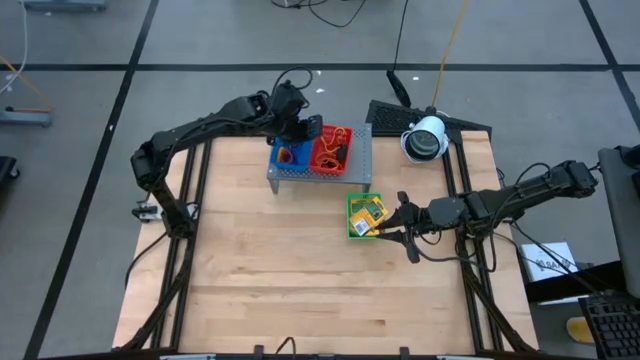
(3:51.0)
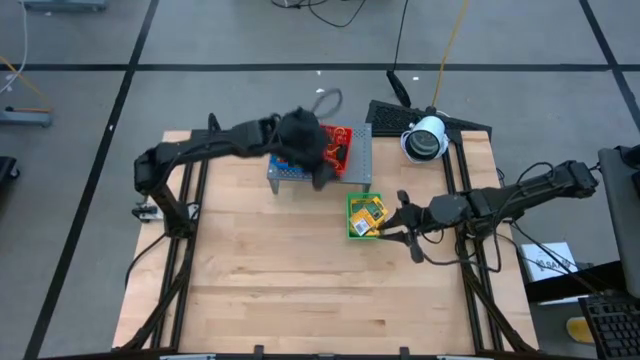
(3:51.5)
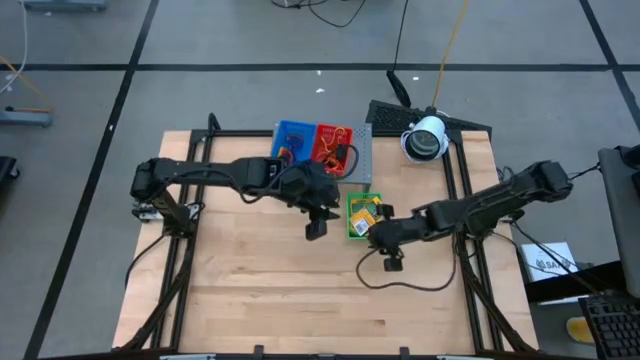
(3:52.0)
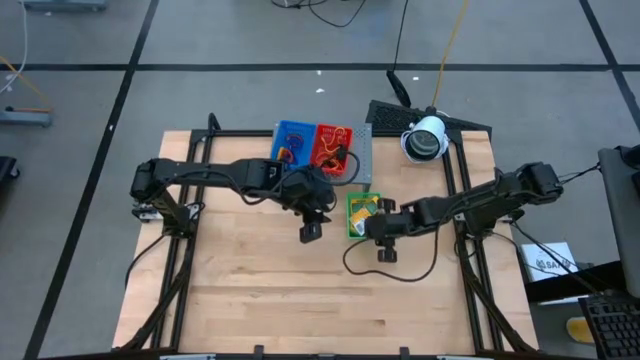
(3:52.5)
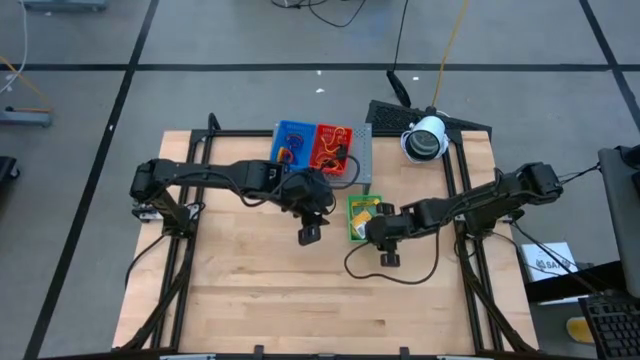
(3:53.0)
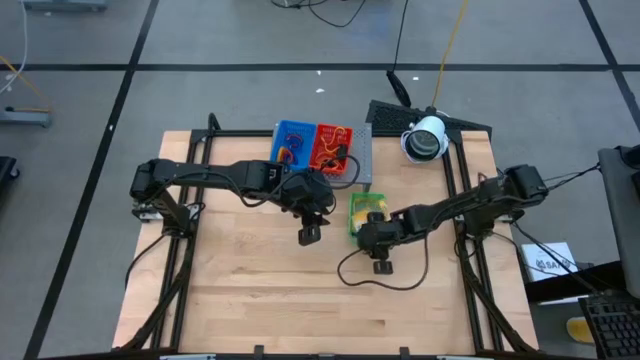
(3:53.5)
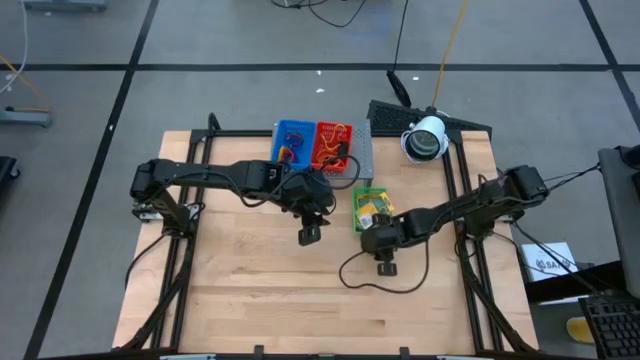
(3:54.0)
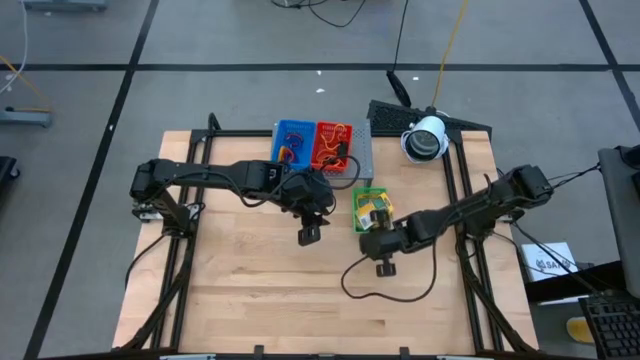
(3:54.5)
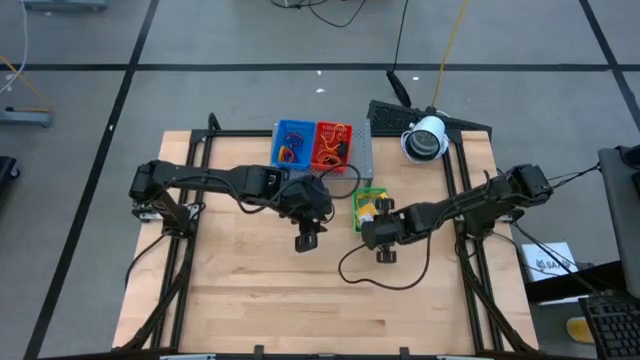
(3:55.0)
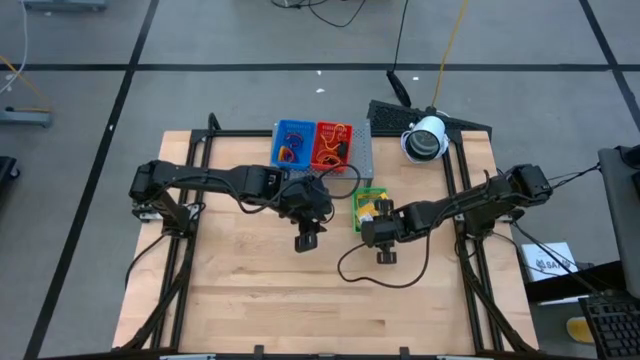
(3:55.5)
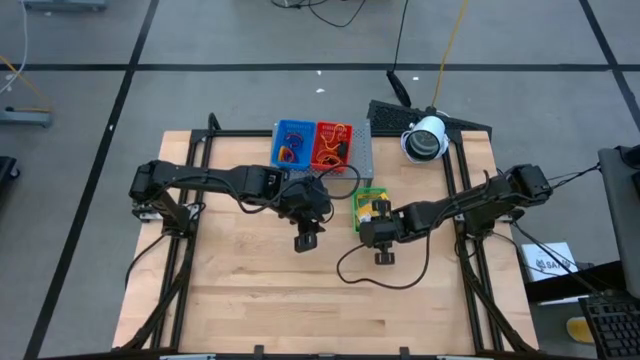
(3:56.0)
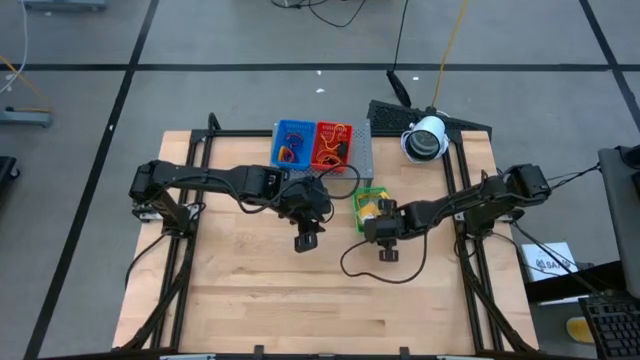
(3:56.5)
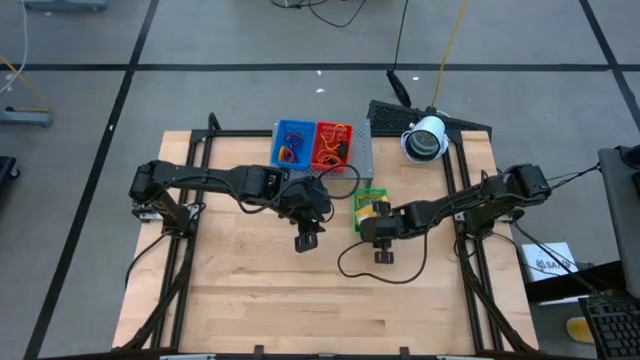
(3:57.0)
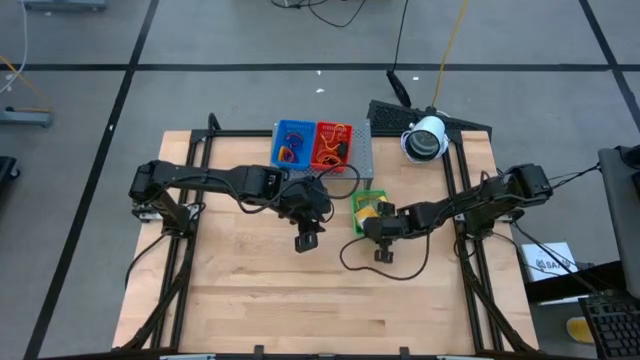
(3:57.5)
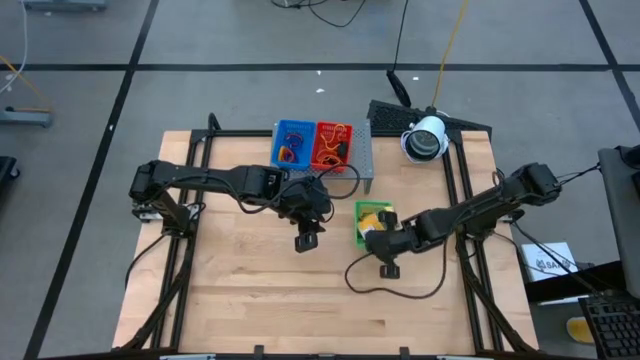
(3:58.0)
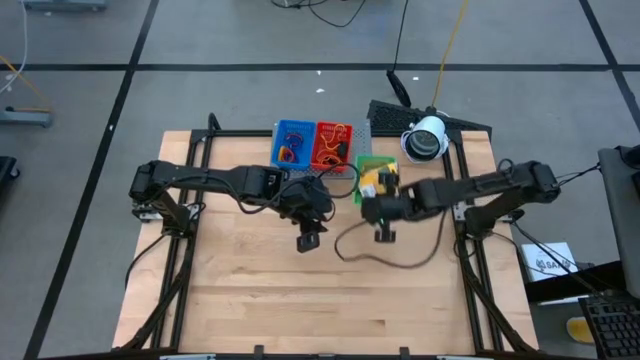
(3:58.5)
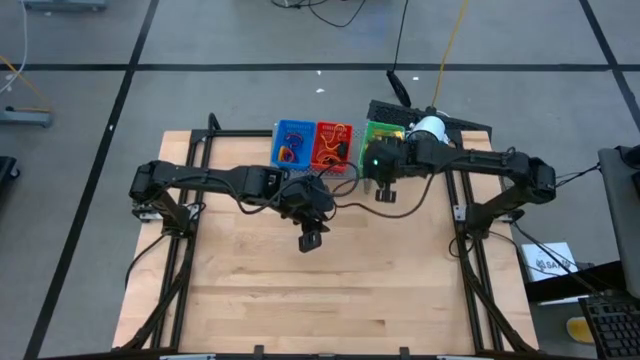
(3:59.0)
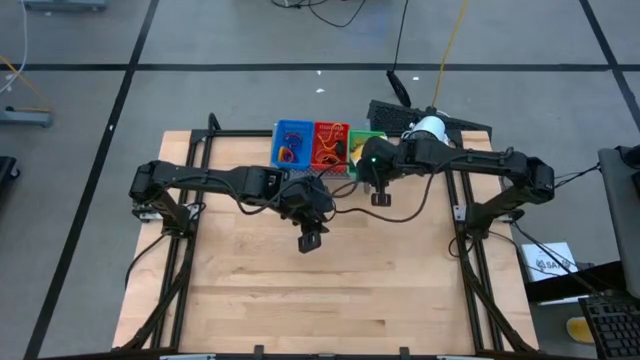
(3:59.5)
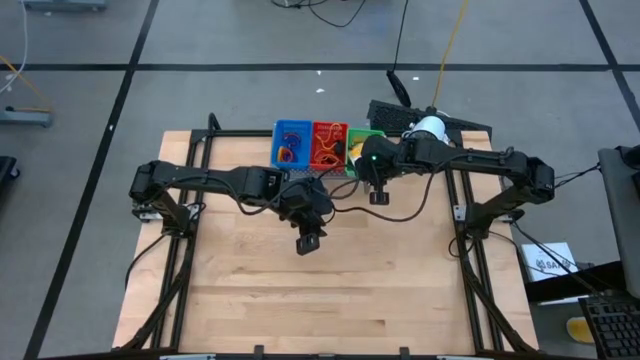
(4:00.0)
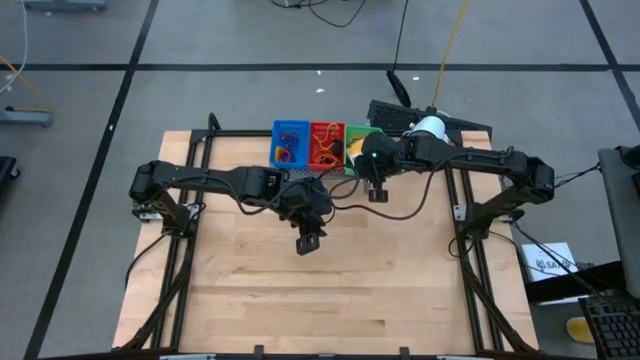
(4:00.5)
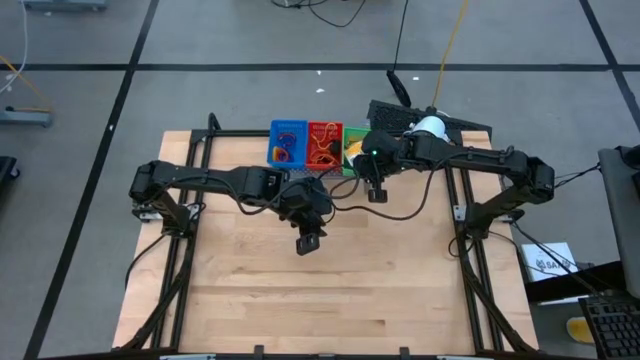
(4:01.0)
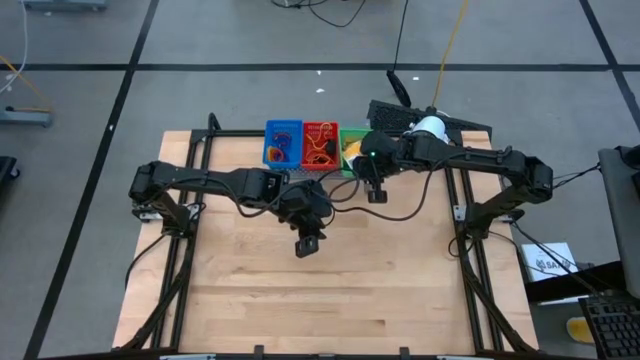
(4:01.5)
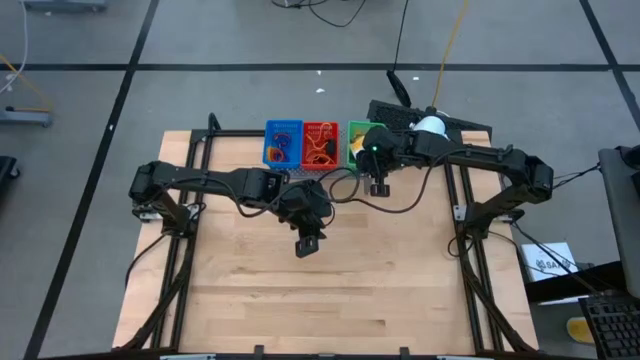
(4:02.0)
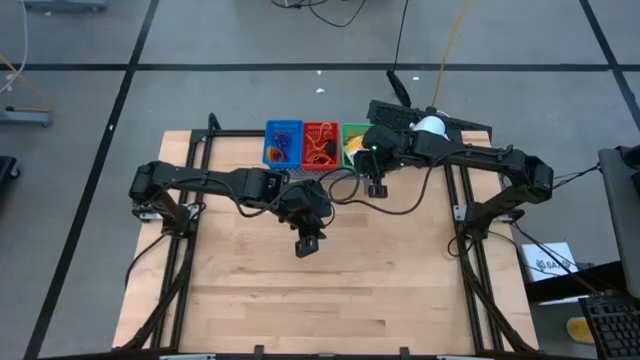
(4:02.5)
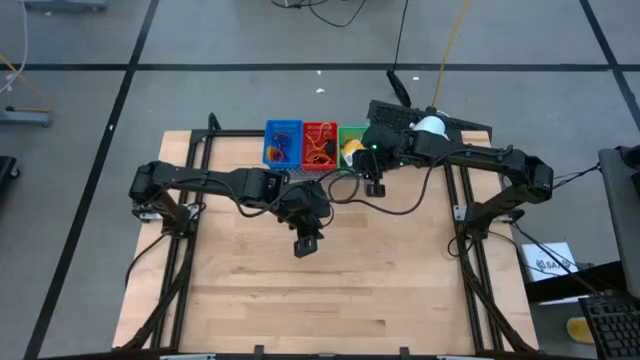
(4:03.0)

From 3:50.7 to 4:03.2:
Task: Pick & Place Office Desk Supplies
Put the green bin on the shelf

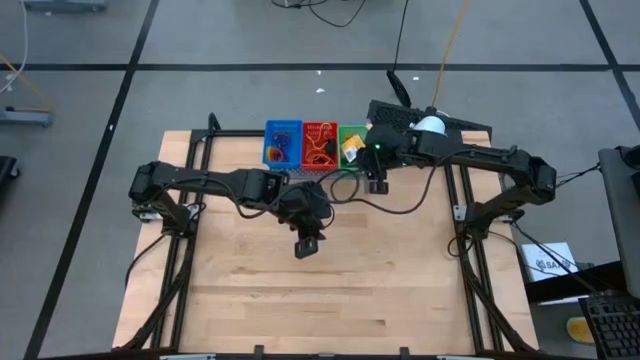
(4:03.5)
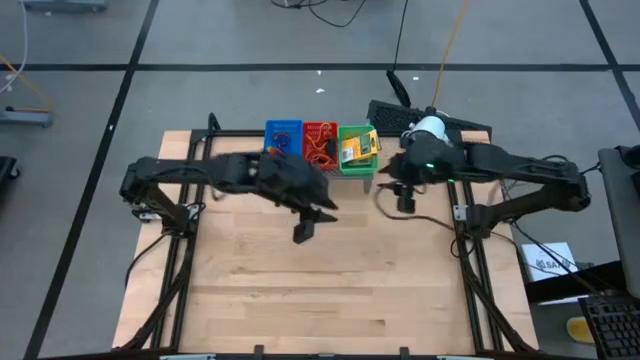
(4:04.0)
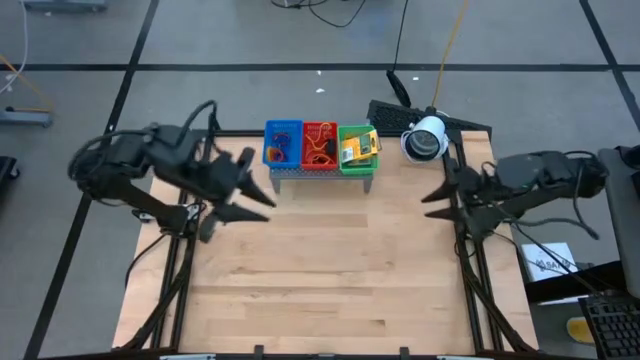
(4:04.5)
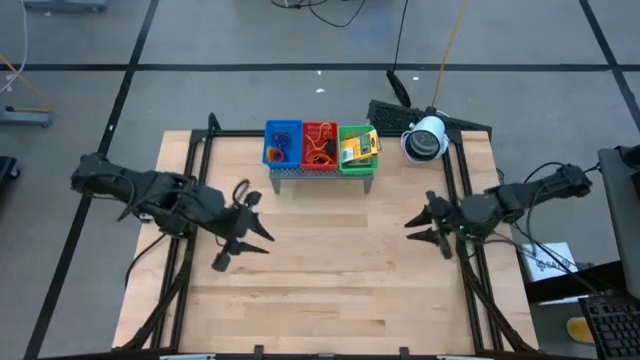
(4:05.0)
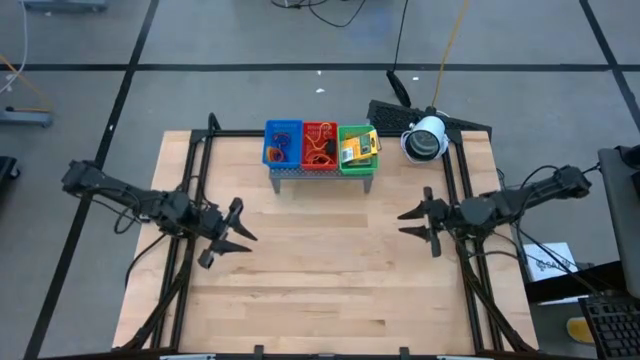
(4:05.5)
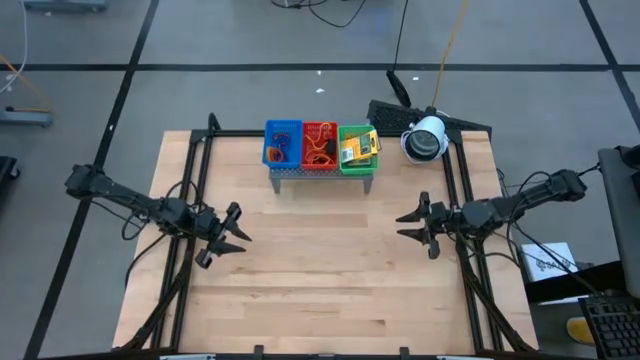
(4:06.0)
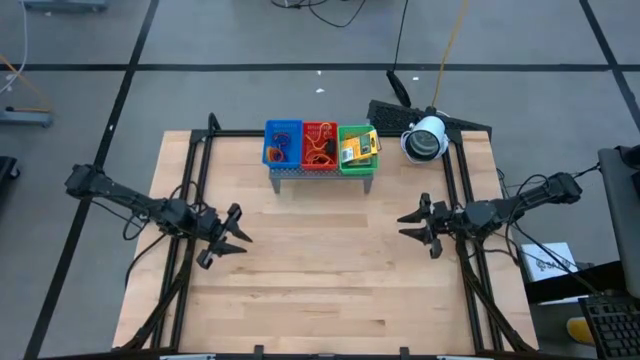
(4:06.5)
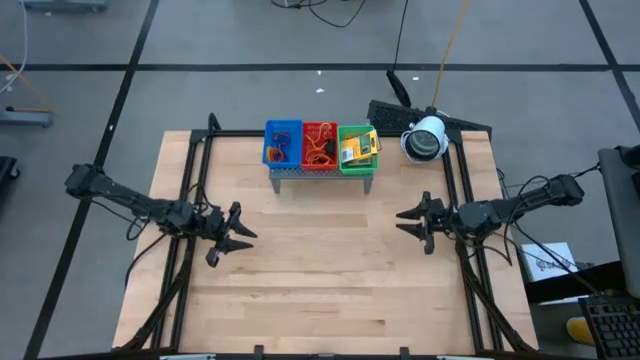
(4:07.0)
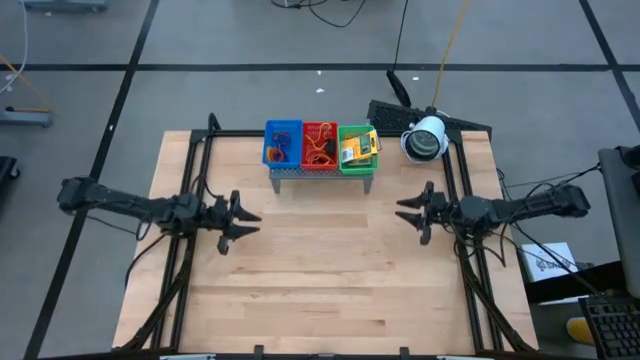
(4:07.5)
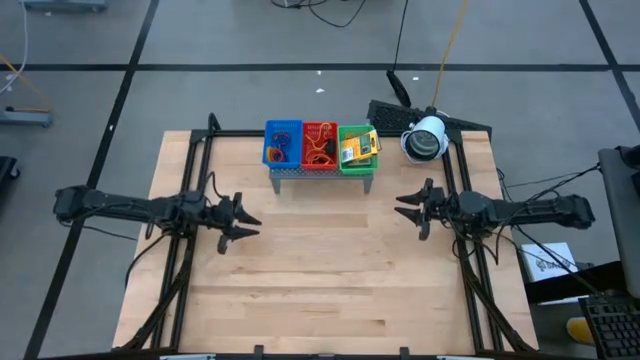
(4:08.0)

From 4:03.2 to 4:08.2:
Return to Home Position

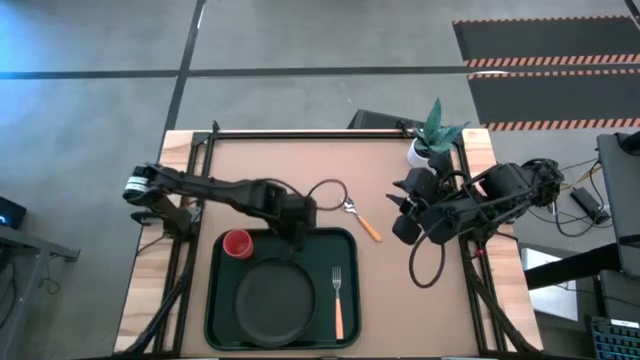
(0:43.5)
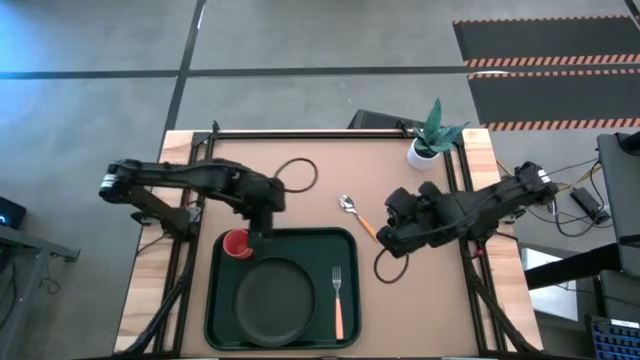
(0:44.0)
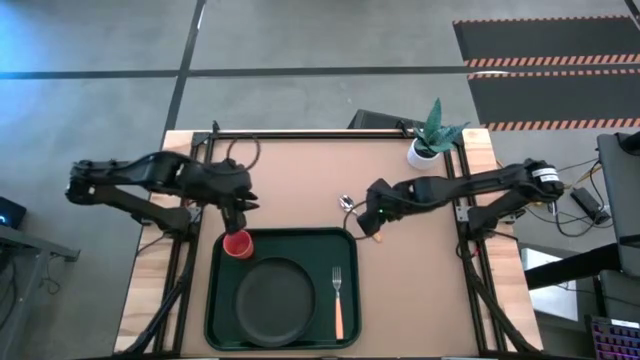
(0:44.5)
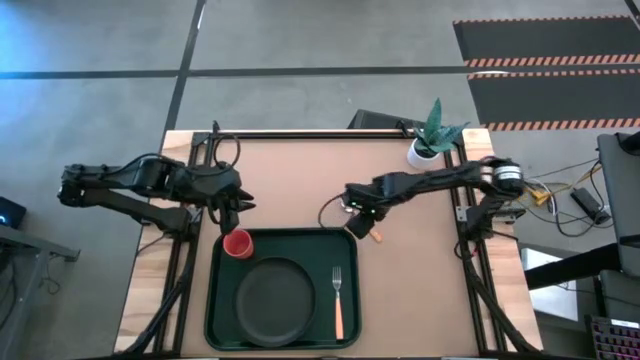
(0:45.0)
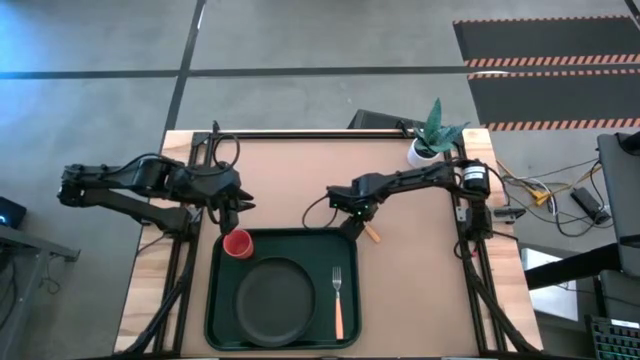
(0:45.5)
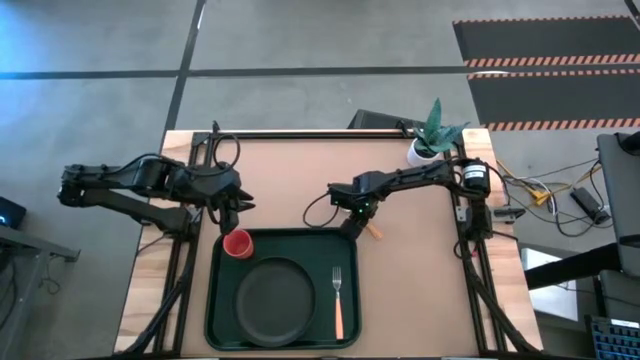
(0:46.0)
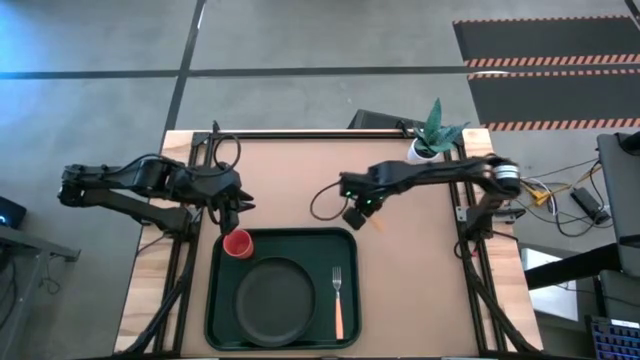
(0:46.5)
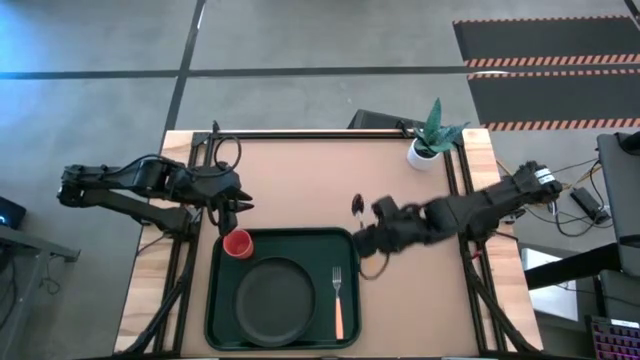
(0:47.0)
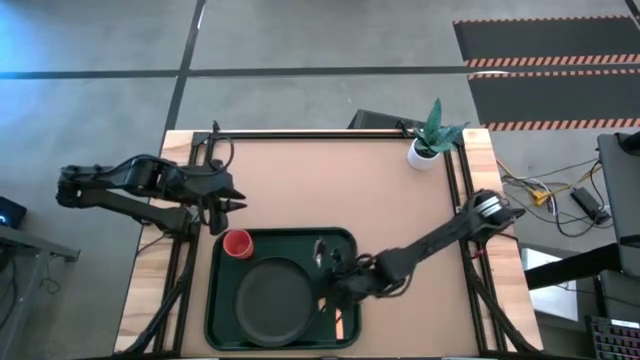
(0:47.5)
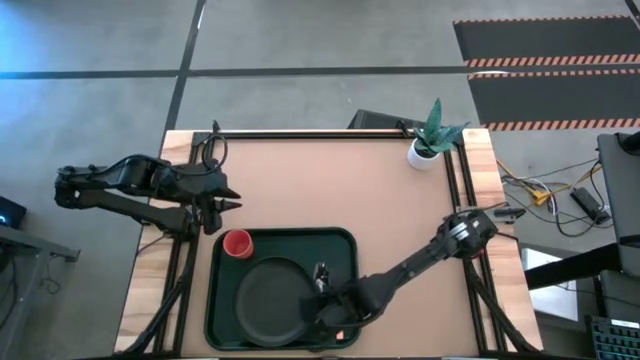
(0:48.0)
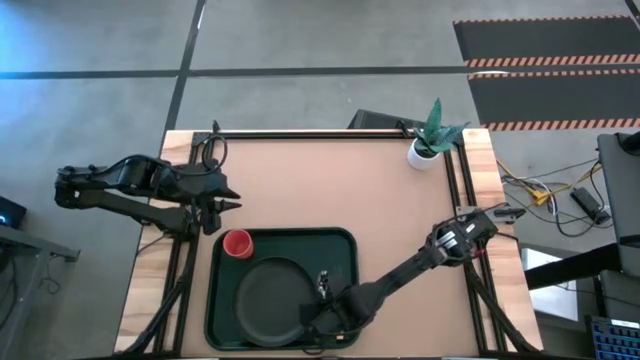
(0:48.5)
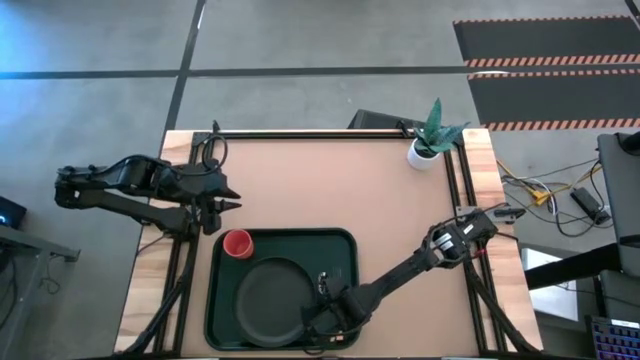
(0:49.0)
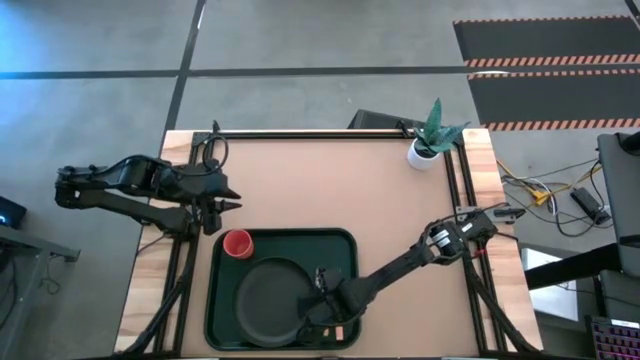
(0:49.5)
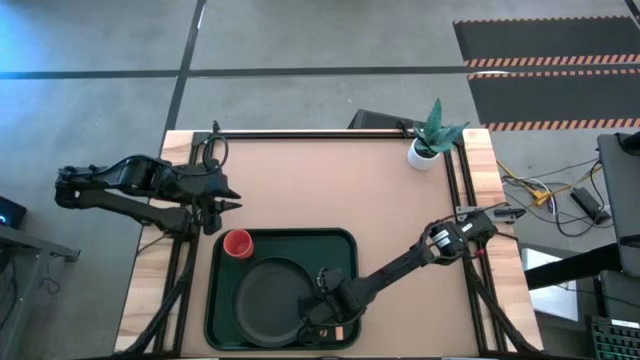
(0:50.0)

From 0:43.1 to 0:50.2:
Task: Pick and place plate/cup/fork/spoon on tray
Put the orange spoon on the black tray to the right of the black plate
